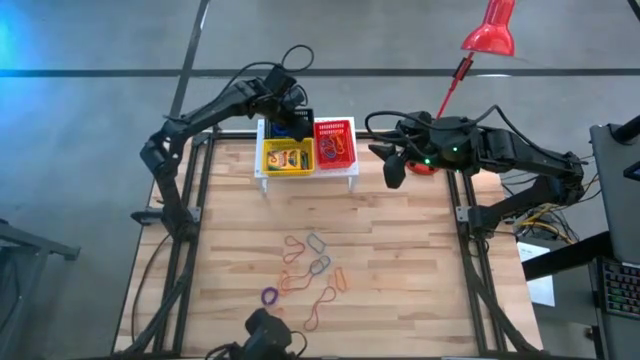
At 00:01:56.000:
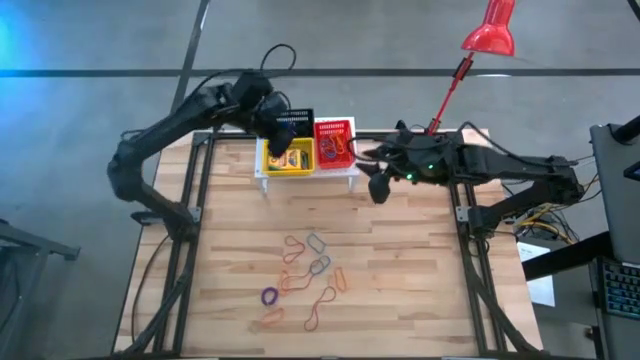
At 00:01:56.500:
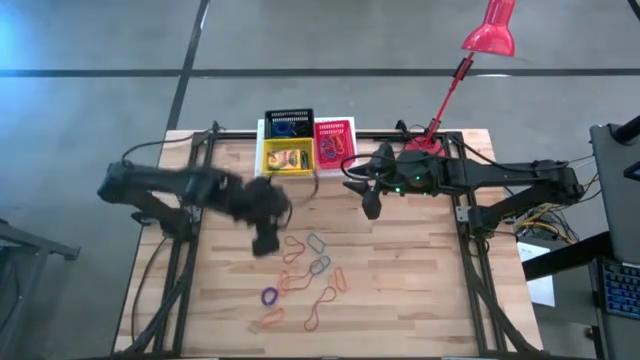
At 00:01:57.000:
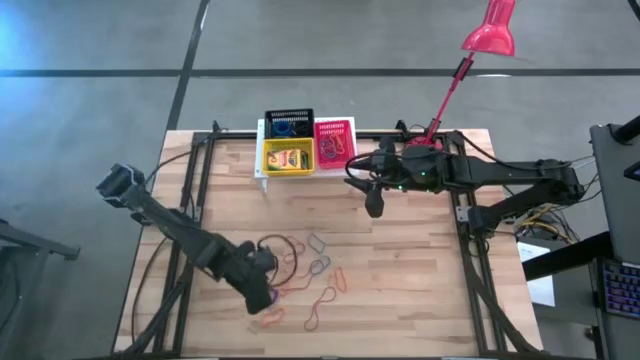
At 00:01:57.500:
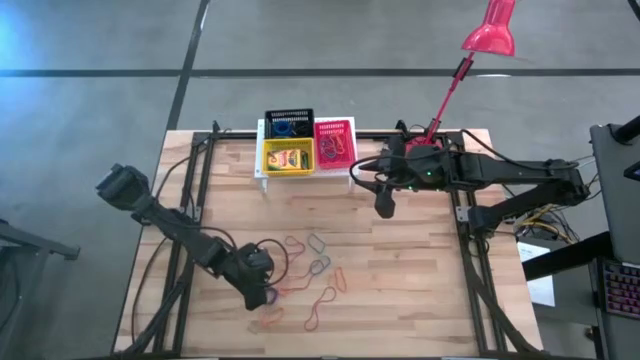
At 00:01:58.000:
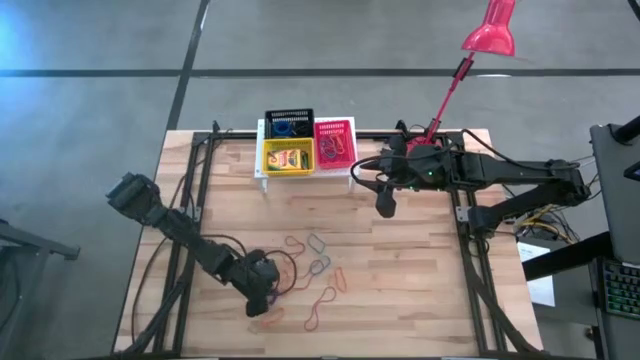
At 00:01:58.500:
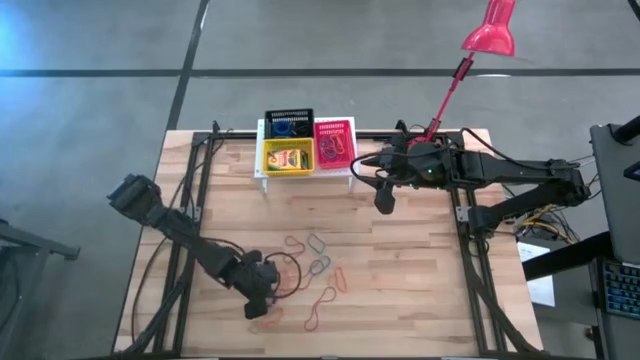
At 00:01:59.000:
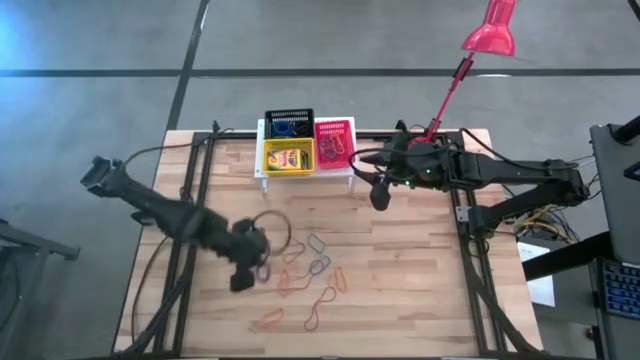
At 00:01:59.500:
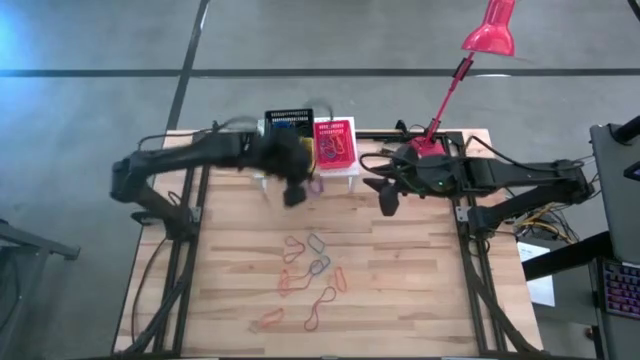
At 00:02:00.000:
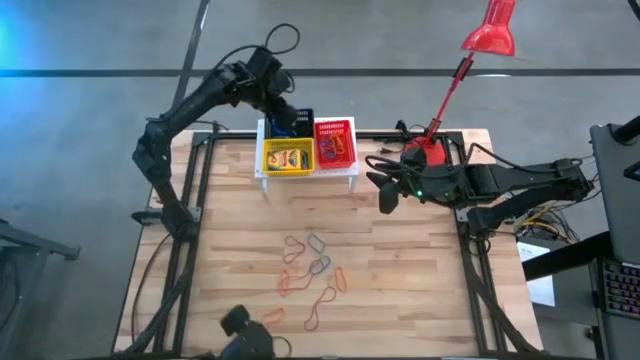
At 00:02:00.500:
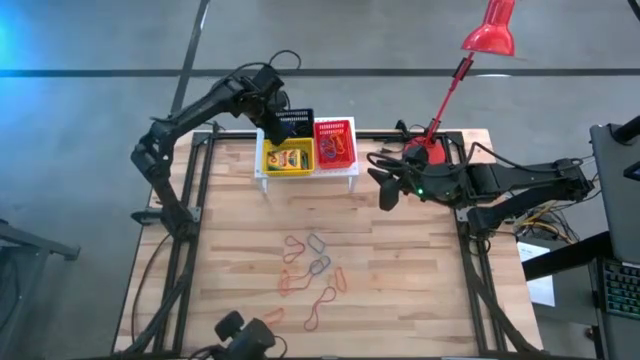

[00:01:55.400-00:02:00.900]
Task: Pick & Place Office Desk Supplies
Put the purple spring keychain into the black basket on the shelf

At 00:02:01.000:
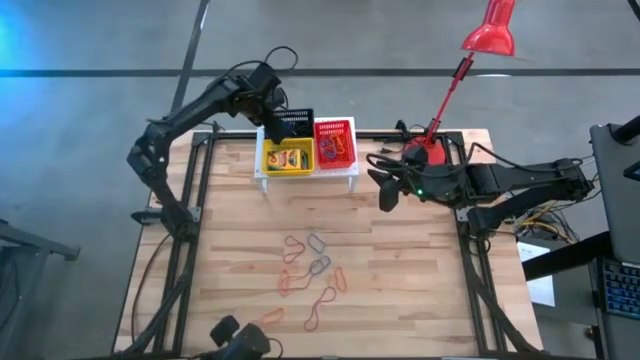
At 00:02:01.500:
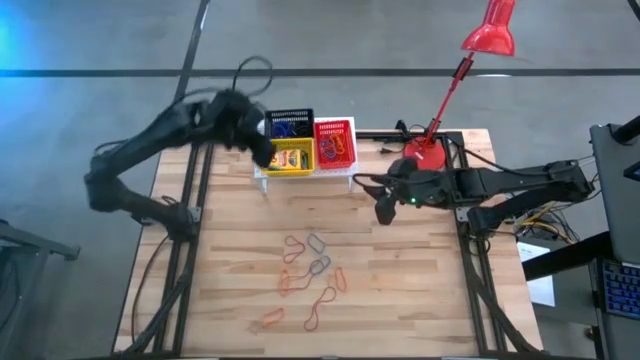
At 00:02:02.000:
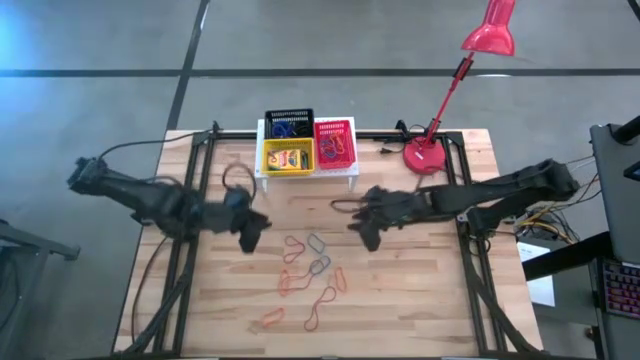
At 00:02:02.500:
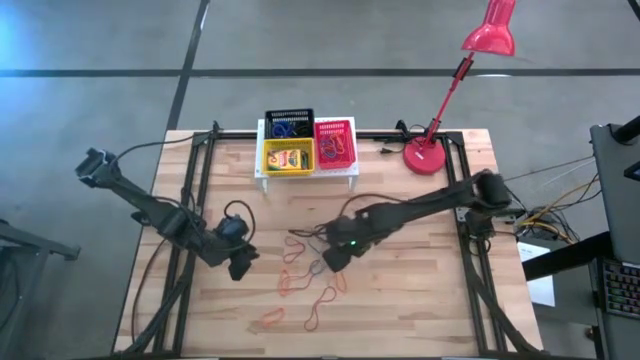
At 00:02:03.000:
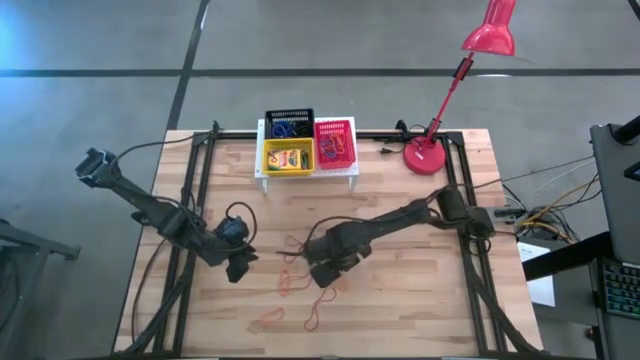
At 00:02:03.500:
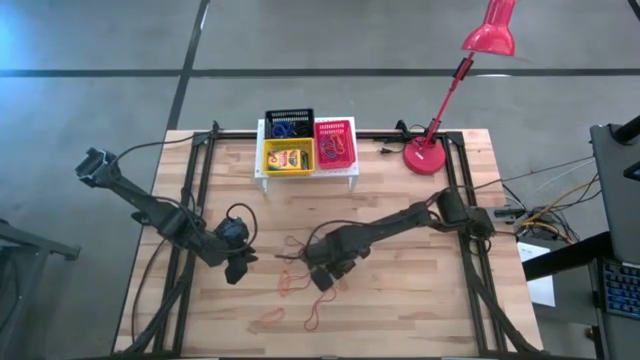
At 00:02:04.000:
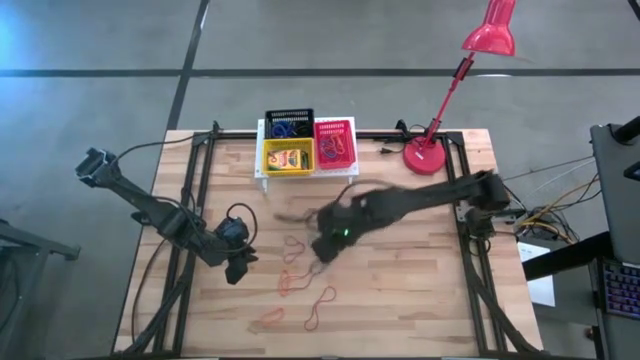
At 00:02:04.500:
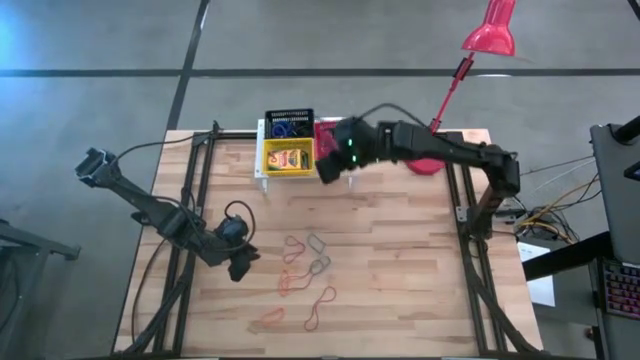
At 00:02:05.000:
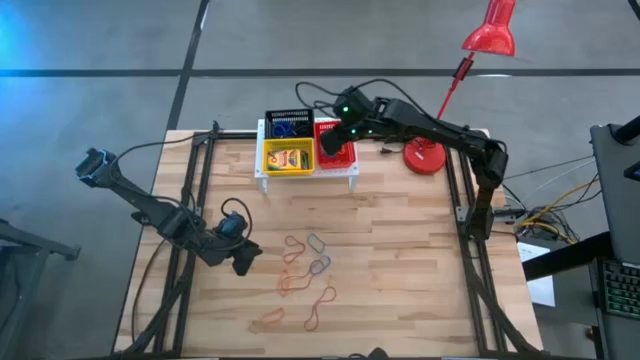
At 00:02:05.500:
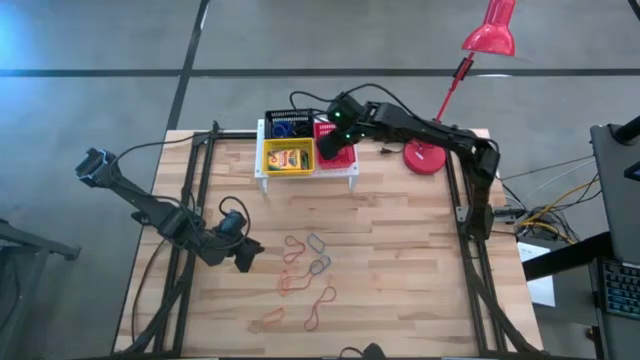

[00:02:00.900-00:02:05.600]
Put the orange rubber band into the red basket on the shelf

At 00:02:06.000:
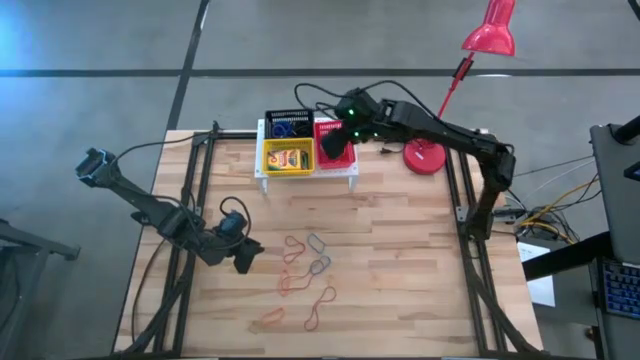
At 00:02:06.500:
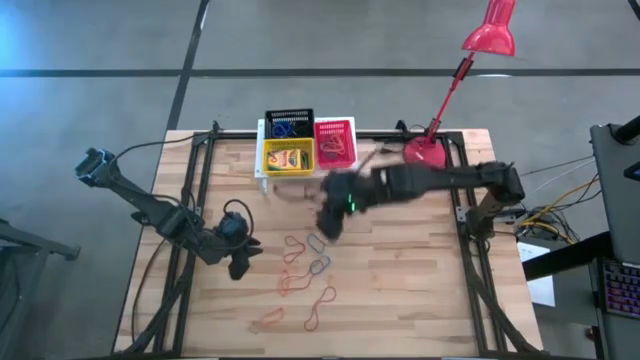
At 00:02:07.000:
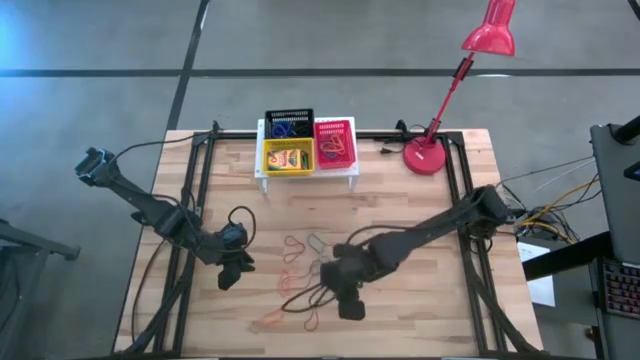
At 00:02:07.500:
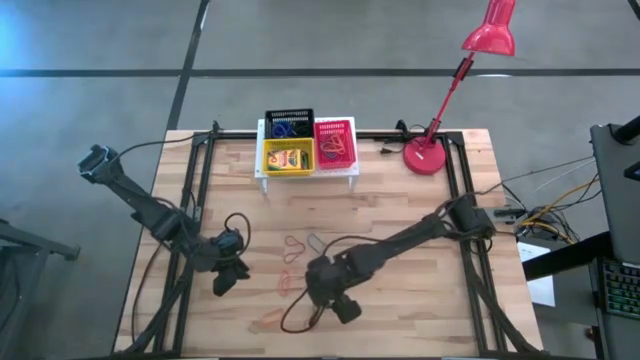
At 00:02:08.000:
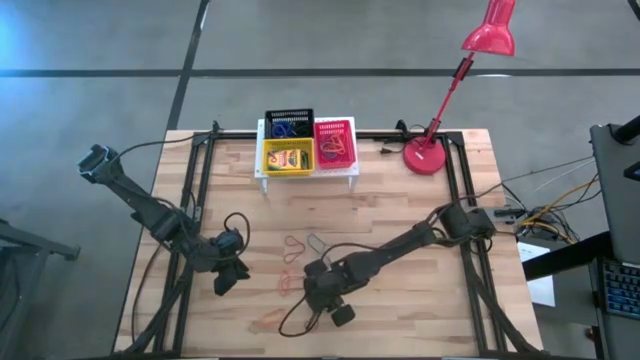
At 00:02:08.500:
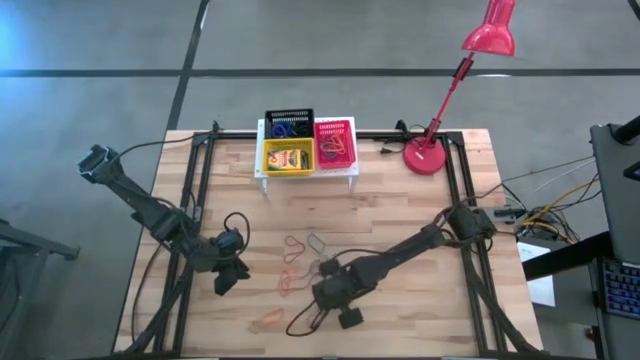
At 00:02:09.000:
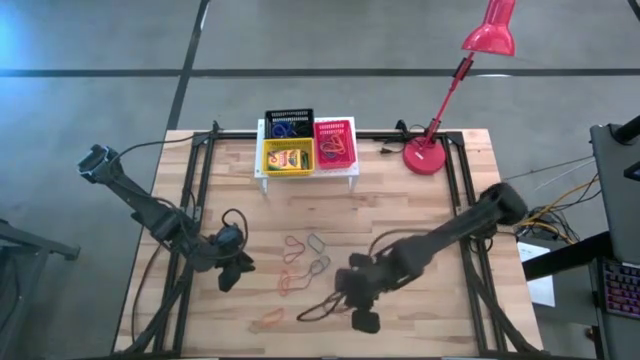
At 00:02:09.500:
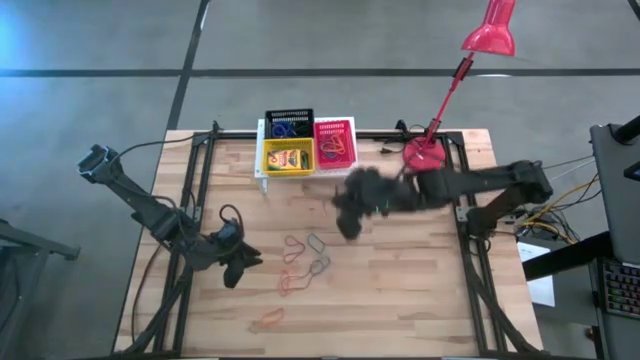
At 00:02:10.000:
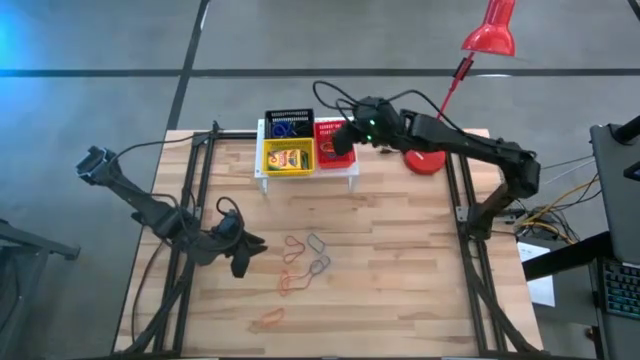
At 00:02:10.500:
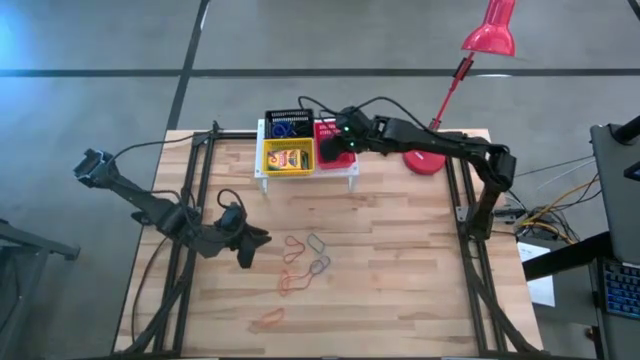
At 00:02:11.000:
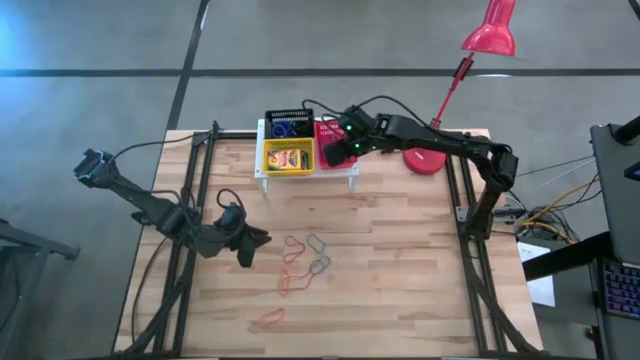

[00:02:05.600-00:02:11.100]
Put the red rubber band into the red basket on the shelf

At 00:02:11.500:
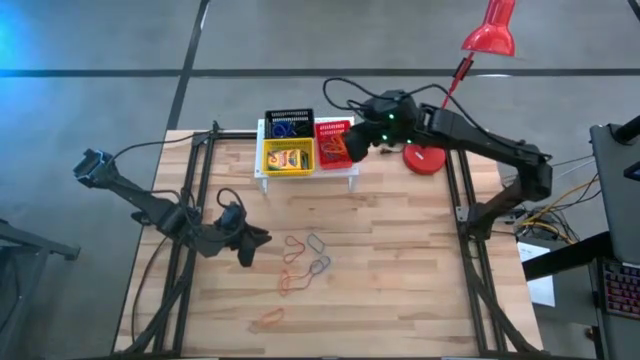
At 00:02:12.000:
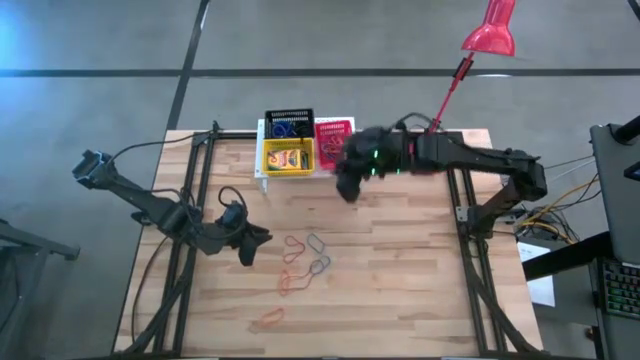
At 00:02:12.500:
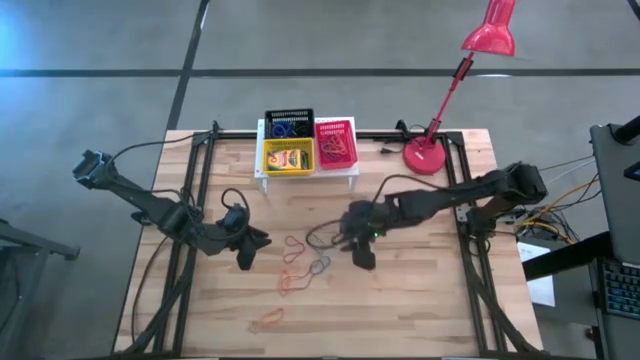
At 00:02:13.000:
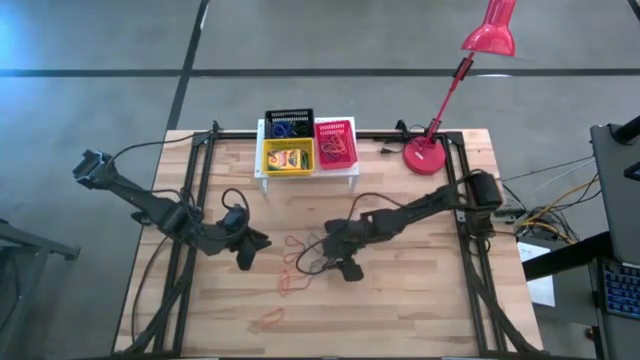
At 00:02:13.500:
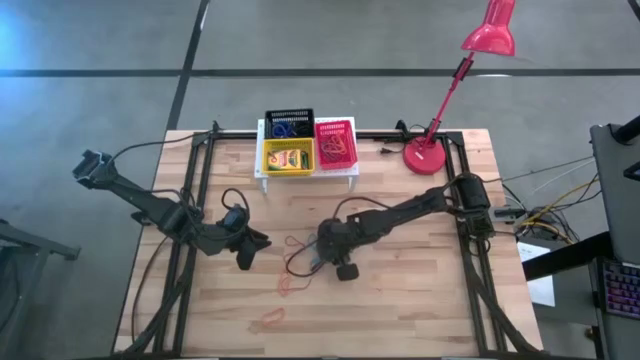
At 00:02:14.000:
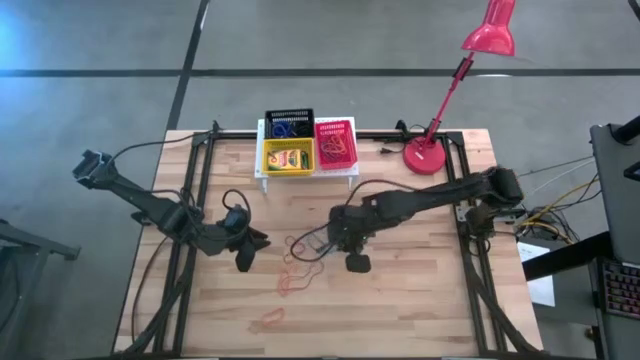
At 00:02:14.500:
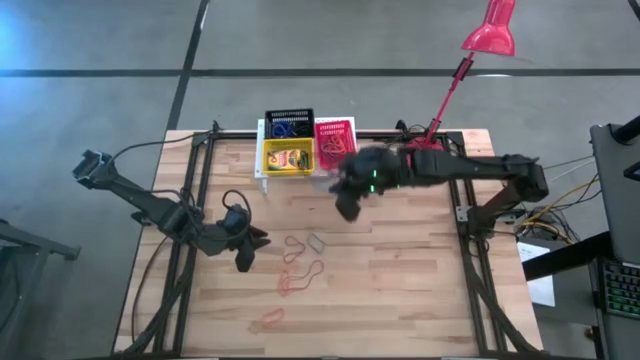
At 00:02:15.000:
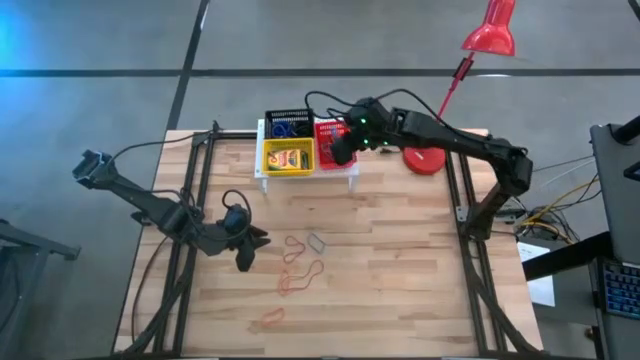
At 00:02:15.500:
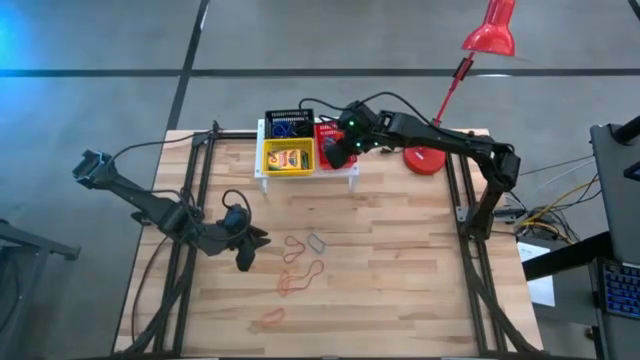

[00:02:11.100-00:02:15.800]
Put the blue rubber band into the red basket on the shelf
